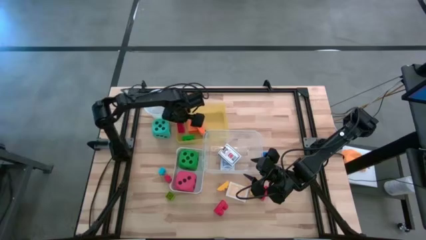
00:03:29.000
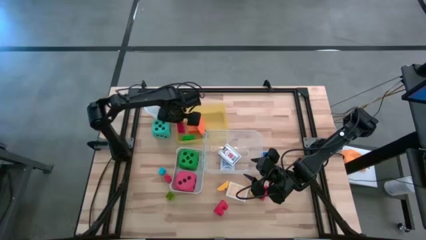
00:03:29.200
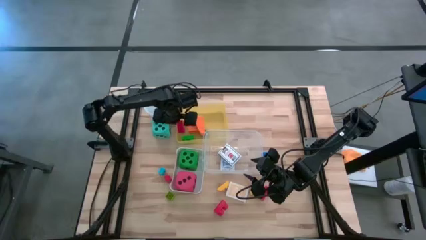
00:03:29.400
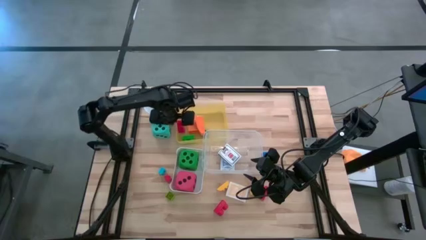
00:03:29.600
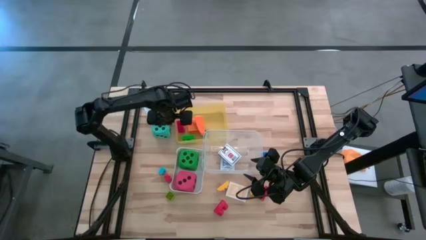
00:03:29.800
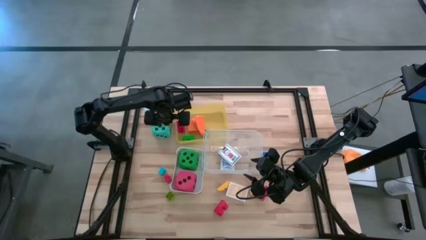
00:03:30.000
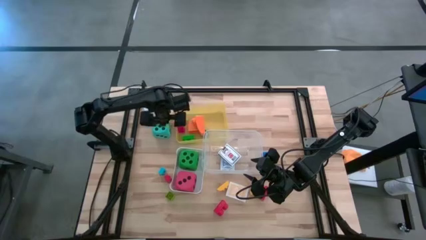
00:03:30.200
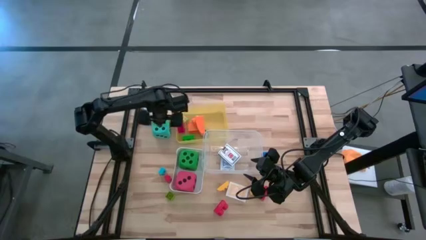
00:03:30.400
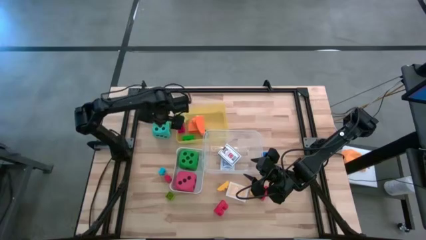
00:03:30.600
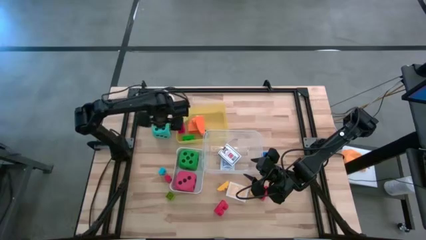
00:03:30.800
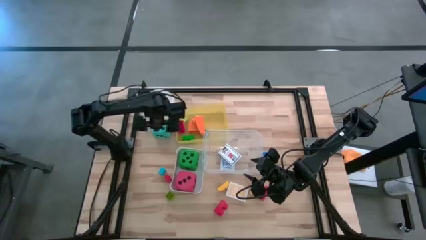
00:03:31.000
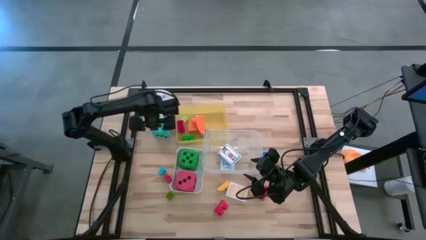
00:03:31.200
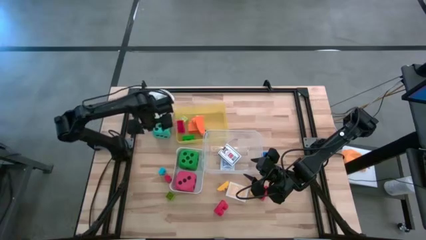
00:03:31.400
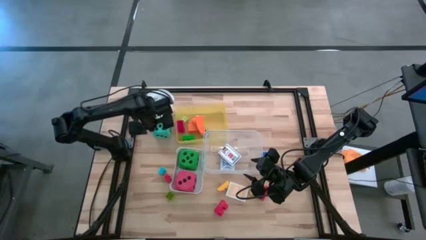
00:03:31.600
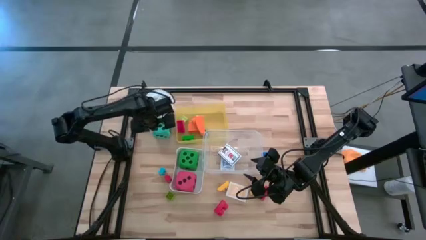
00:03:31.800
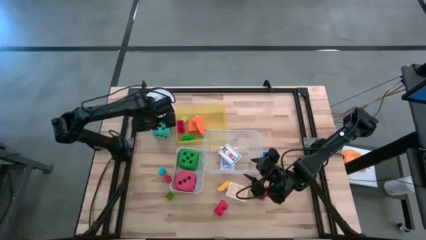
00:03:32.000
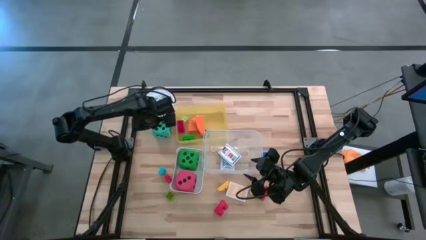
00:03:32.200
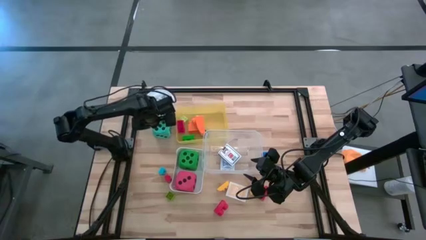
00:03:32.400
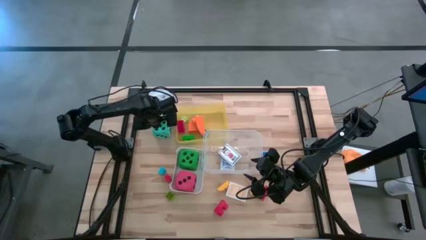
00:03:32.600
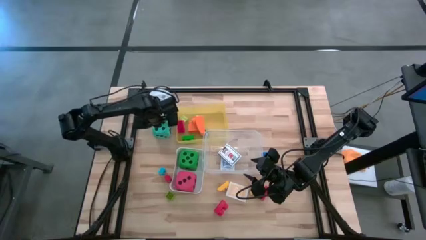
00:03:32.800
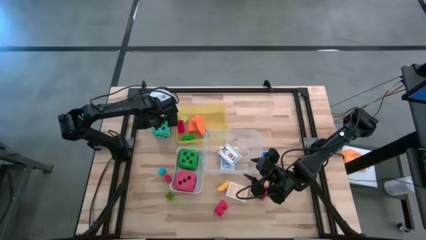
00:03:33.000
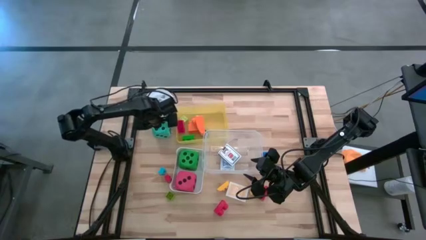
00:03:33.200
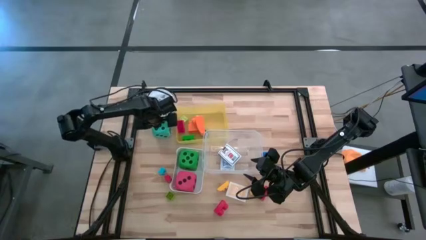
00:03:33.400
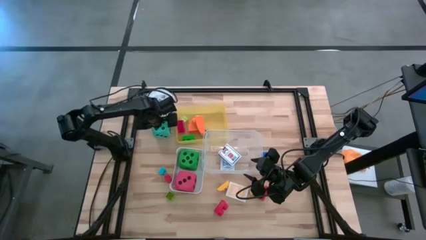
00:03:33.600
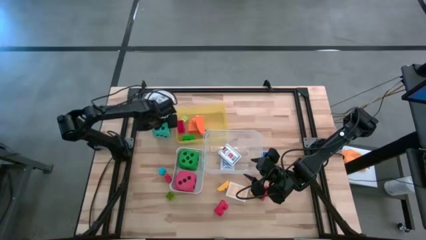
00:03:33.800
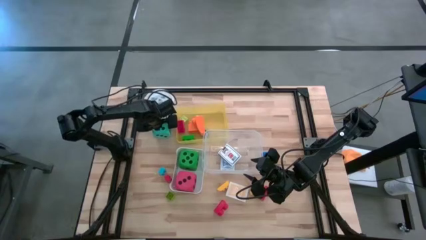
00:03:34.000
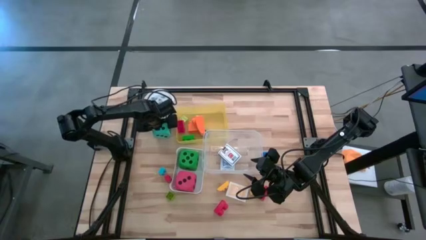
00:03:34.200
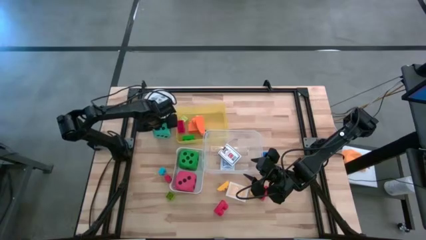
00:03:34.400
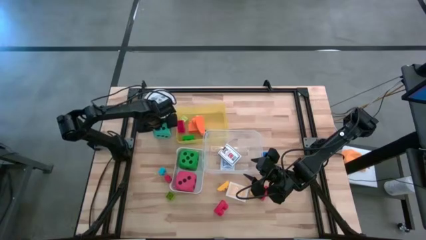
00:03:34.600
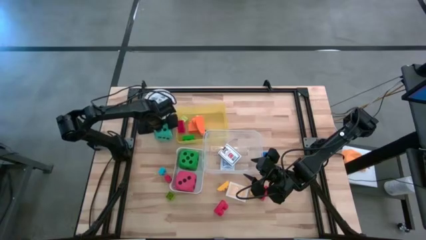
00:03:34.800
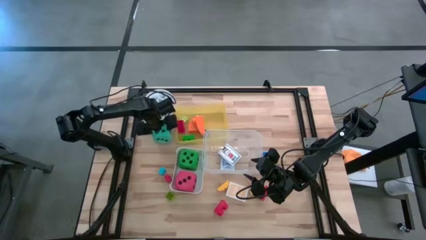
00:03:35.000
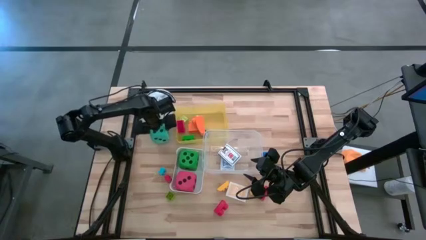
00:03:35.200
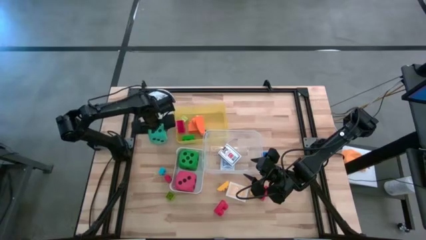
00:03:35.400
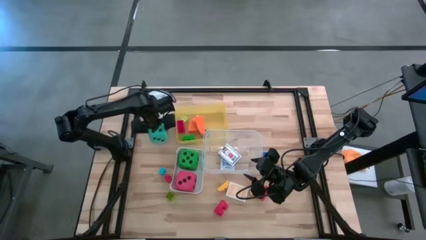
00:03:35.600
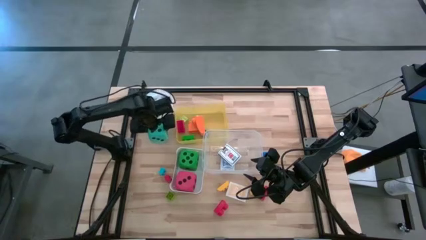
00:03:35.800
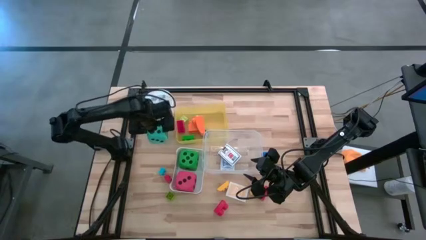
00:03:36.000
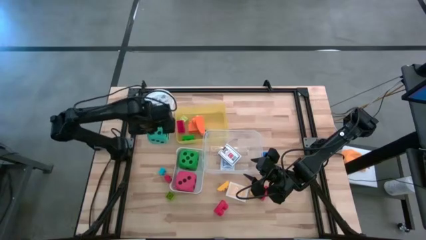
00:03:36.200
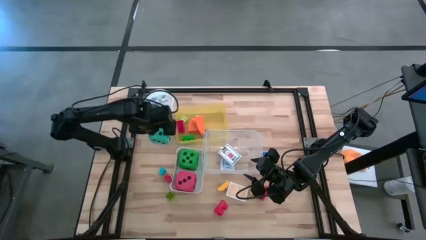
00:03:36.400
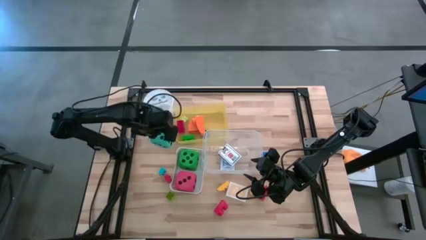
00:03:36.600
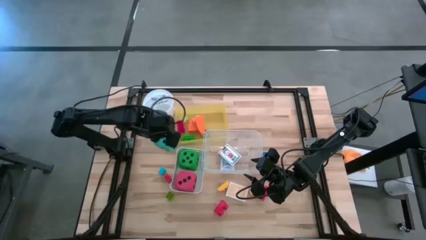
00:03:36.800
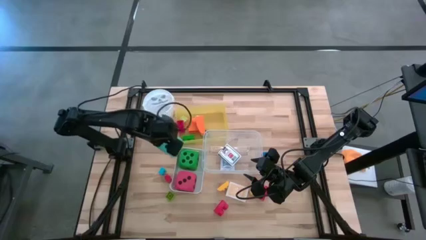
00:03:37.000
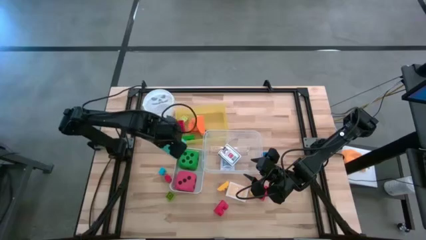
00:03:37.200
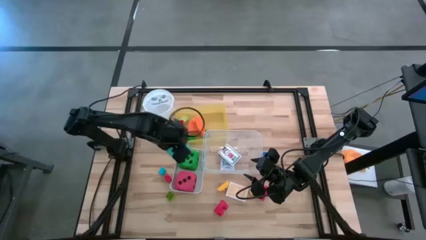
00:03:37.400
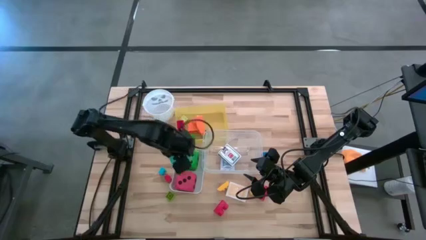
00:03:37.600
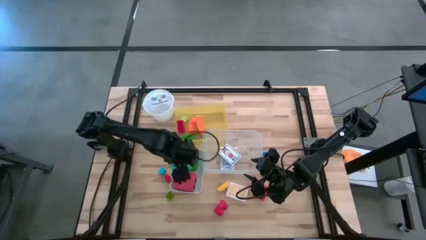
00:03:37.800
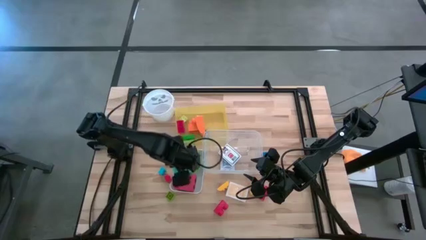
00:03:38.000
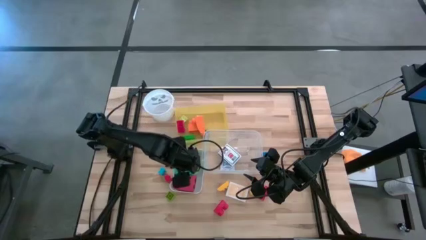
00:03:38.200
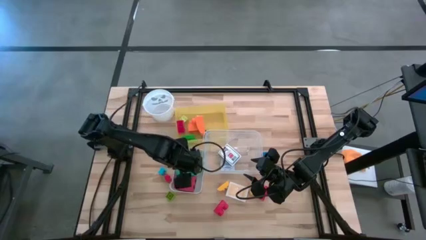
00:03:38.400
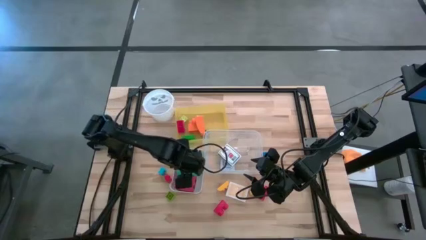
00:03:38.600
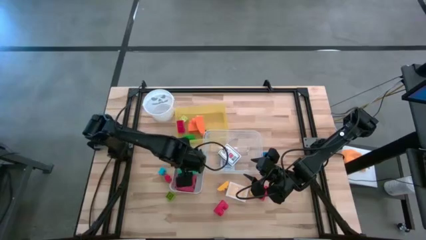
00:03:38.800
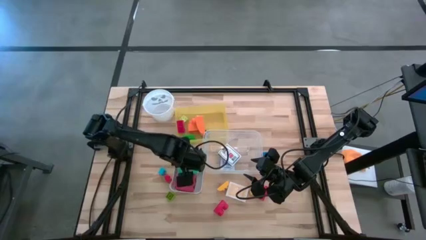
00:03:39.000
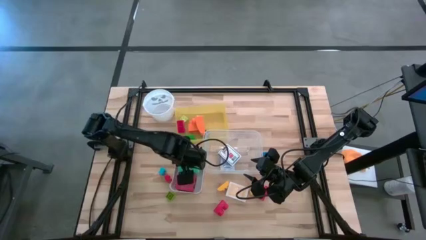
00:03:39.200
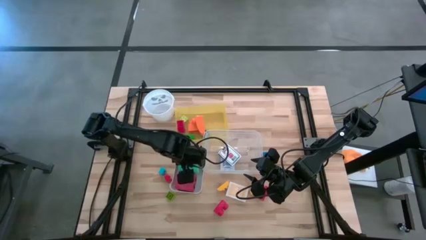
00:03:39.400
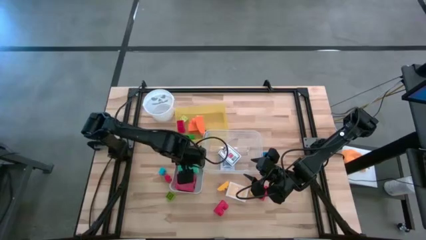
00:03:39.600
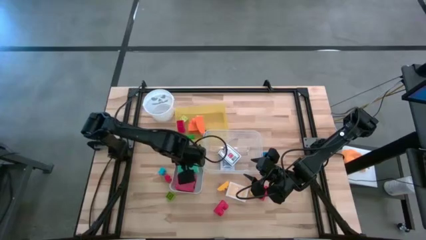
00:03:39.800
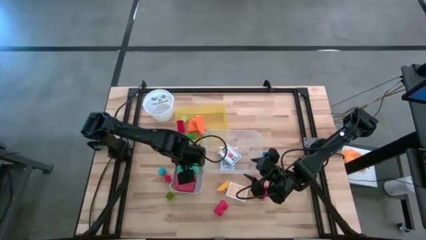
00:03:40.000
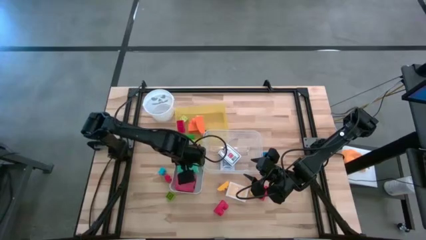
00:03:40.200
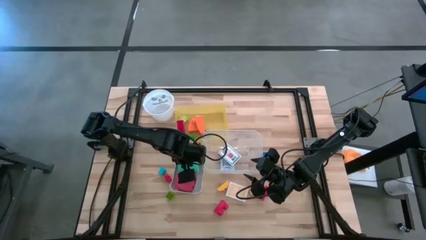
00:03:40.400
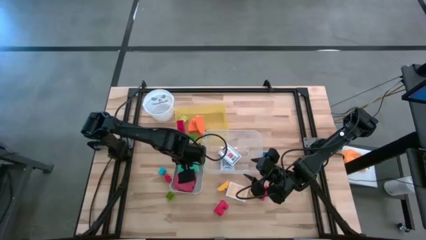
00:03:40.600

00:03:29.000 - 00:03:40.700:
Task: Pick & Place Toys
Put the blue dice into the white bin

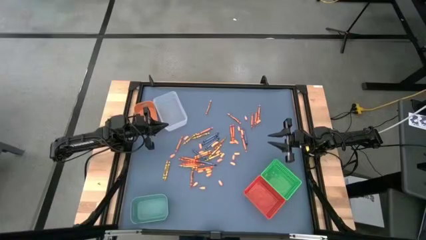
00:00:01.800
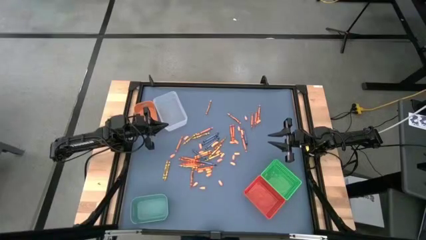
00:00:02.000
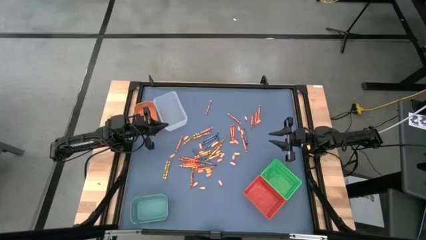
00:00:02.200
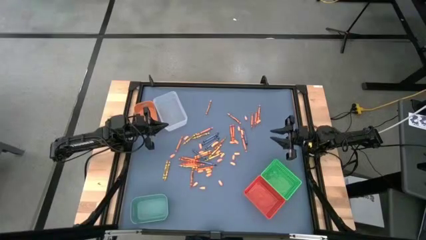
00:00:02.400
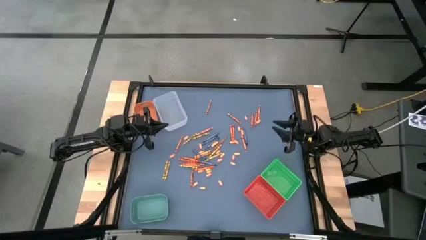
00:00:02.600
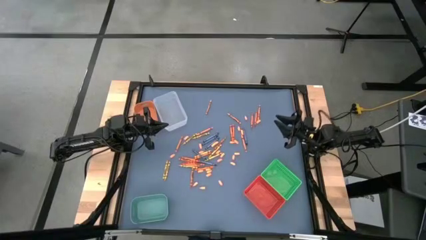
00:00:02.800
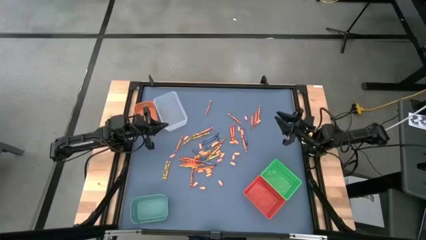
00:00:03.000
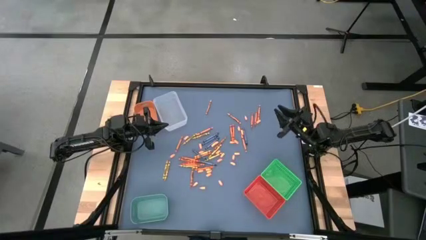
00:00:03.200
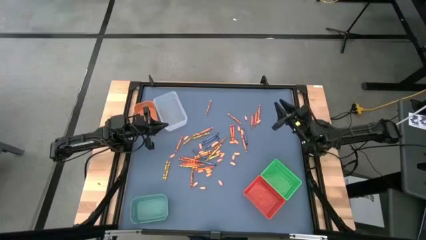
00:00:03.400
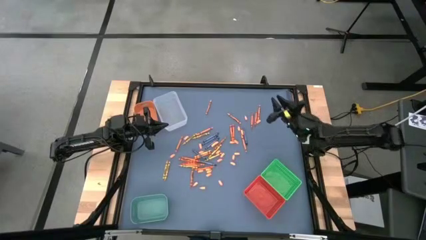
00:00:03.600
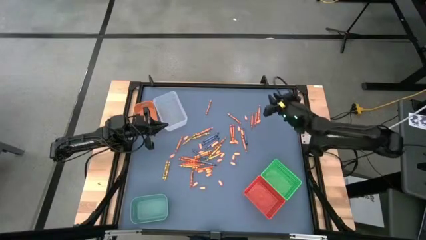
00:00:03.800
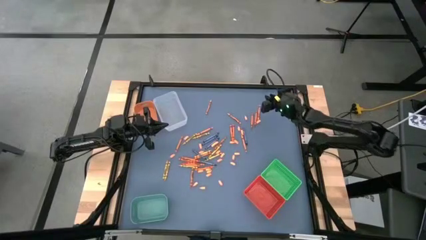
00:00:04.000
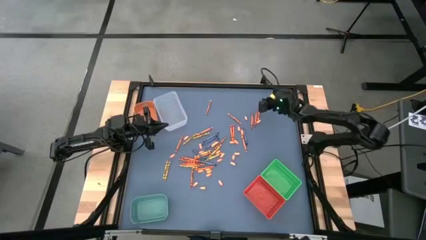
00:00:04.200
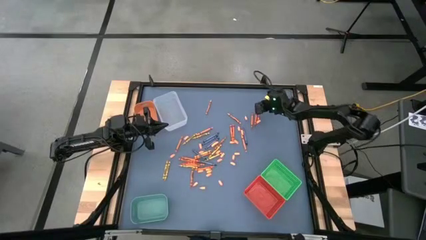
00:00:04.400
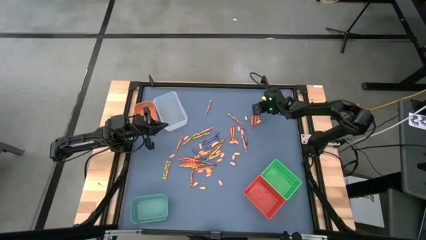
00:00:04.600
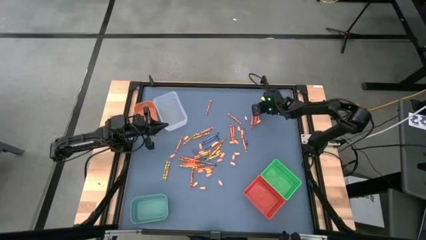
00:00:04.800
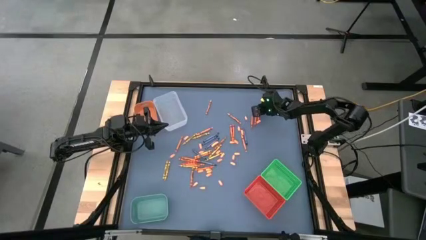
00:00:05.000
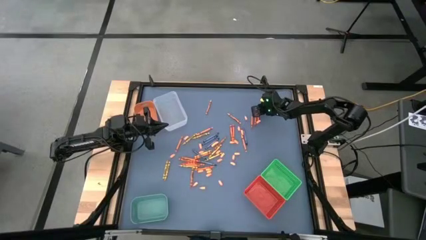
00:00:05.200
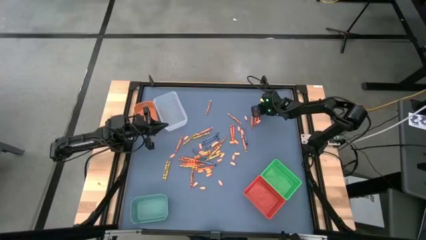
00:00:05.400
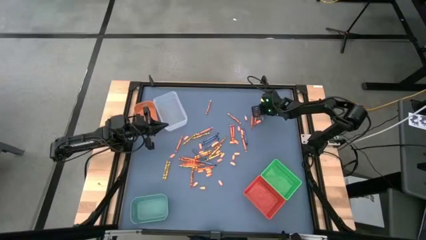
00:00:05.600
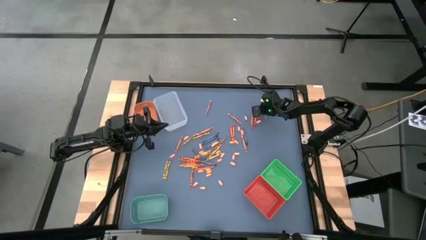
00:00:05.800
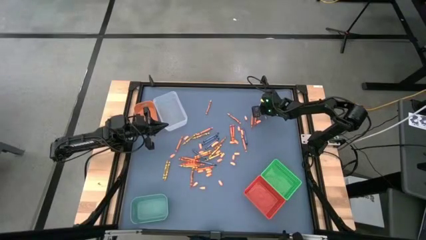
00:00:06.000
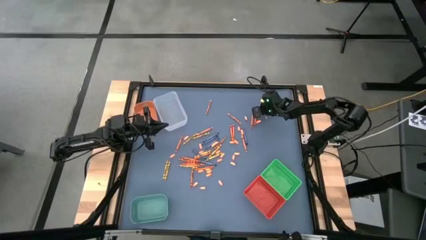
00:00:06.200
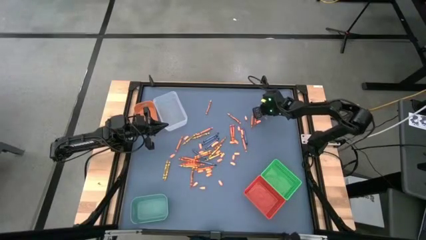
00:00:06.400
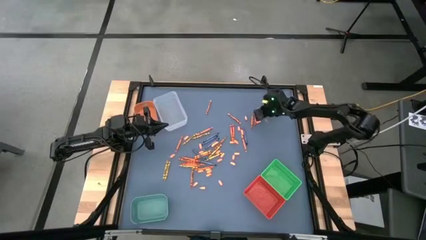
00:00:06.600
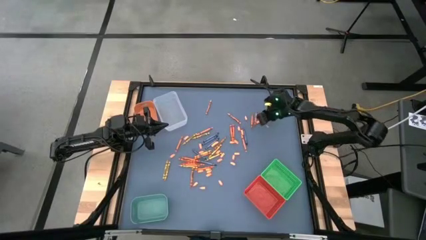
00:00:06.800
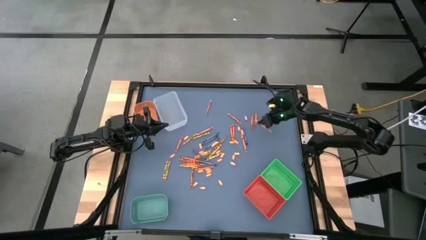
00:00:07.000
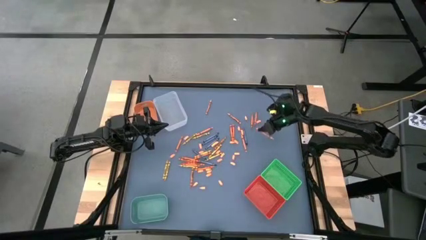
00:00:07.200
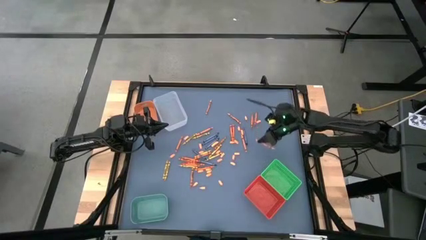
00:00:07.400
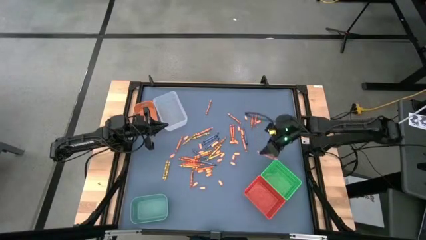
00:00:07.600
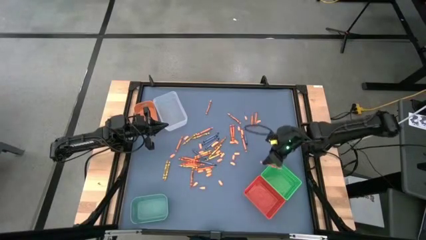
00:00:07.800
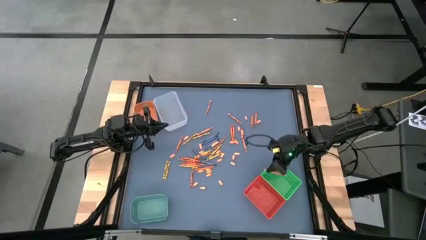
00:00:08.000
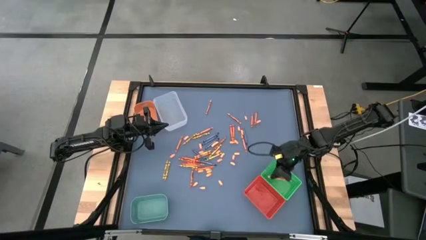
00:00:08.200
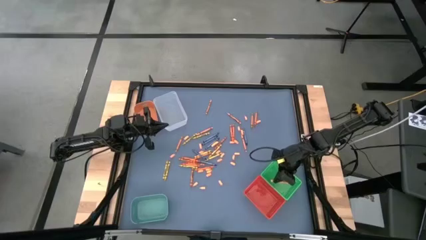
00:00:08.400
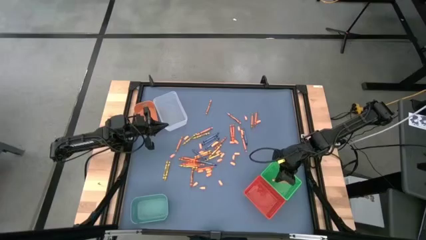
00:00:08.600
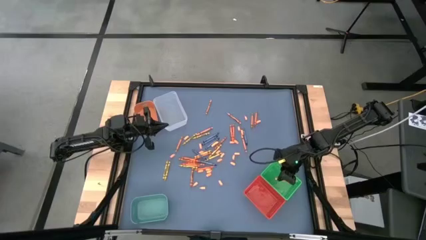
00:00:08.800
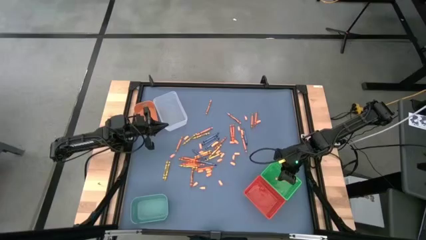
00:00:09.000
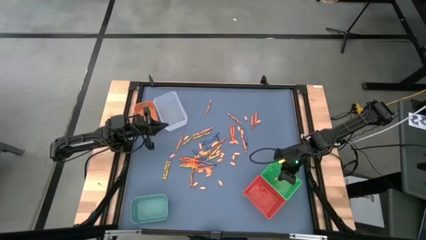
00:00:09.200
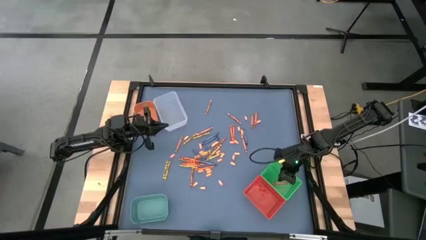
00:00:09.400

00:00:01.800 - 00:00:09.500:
Task: Sort crayons
Put the light orange crayon into the green bin
